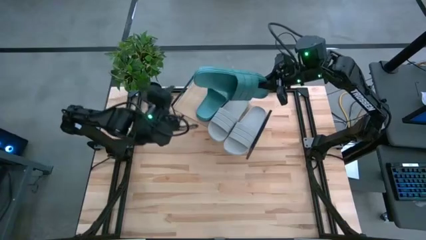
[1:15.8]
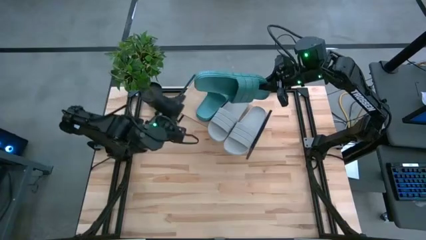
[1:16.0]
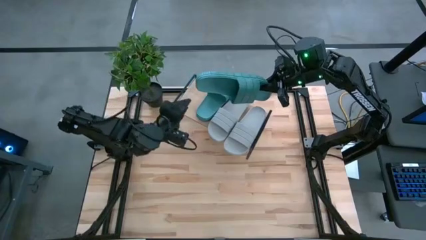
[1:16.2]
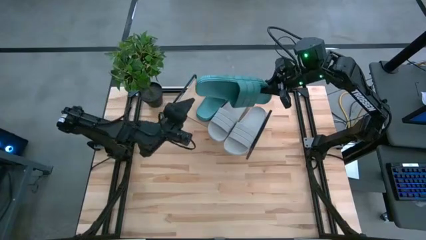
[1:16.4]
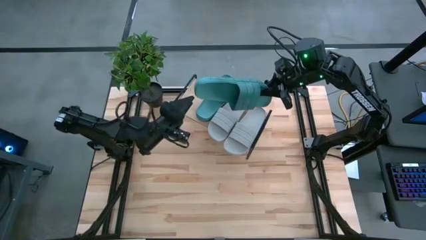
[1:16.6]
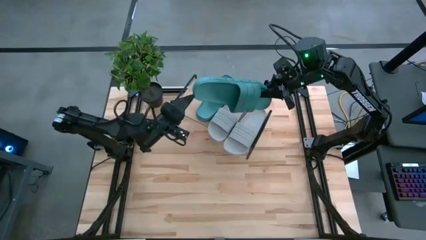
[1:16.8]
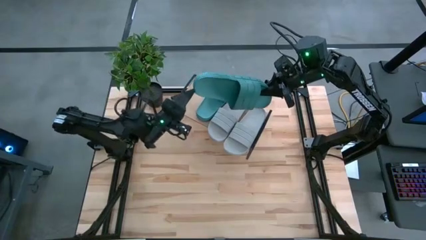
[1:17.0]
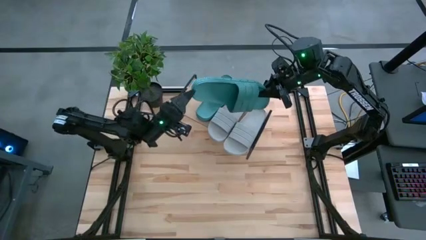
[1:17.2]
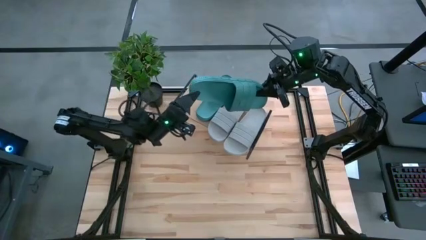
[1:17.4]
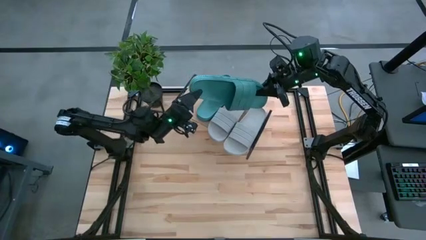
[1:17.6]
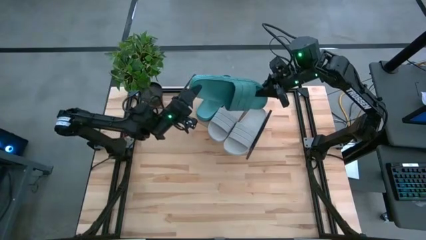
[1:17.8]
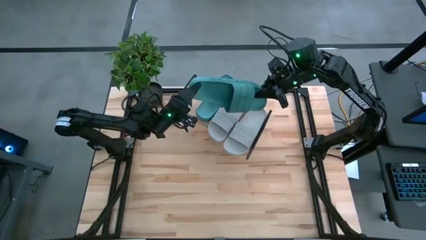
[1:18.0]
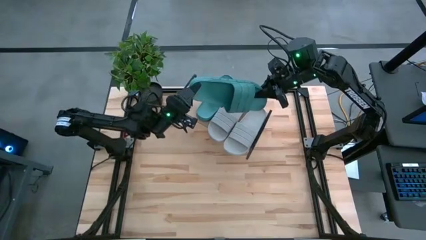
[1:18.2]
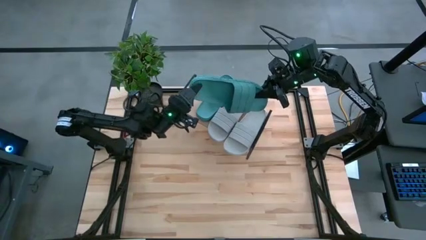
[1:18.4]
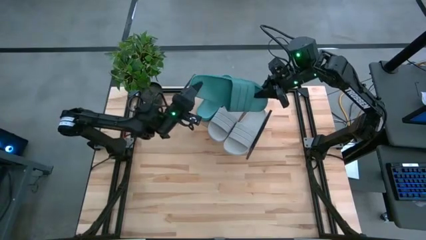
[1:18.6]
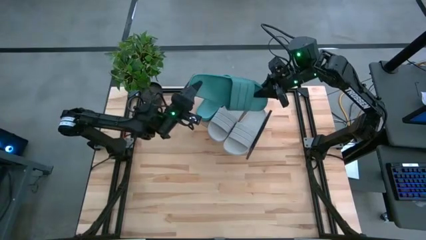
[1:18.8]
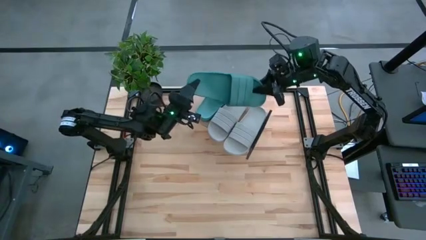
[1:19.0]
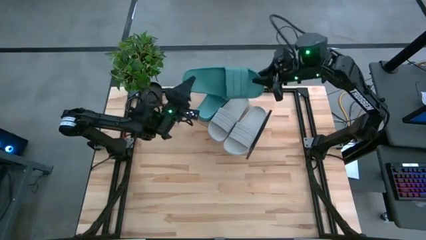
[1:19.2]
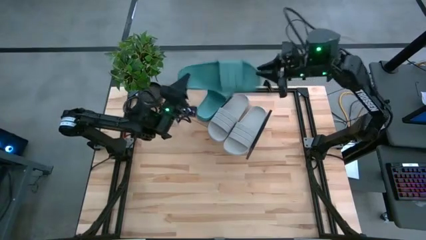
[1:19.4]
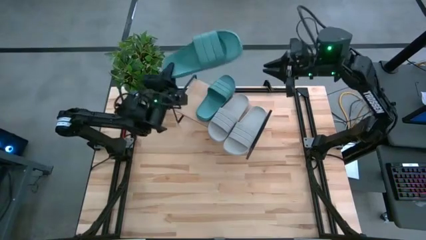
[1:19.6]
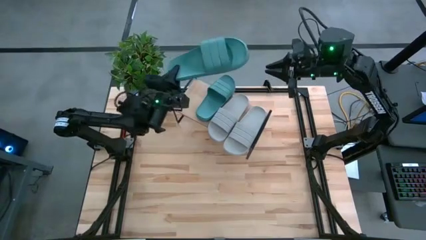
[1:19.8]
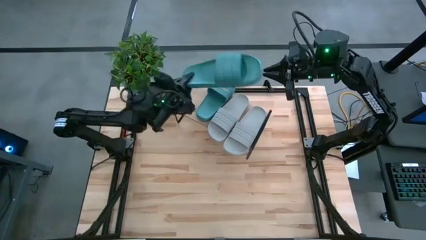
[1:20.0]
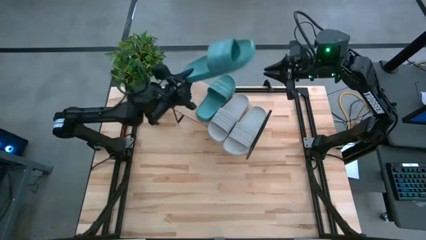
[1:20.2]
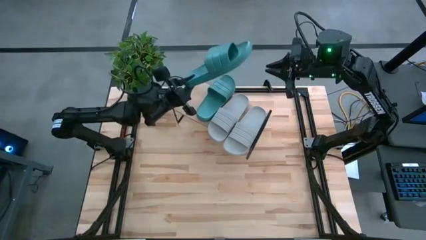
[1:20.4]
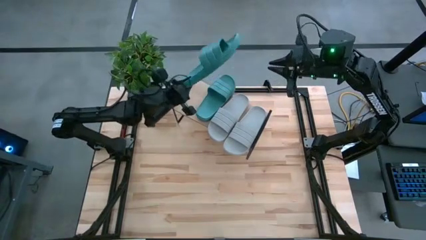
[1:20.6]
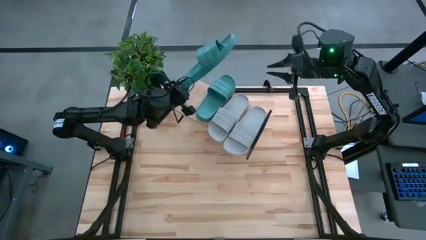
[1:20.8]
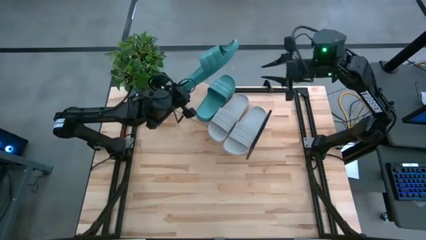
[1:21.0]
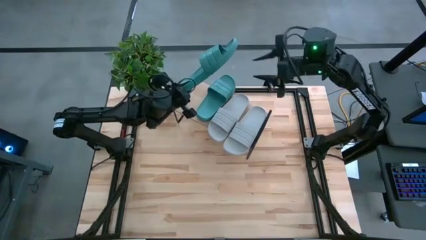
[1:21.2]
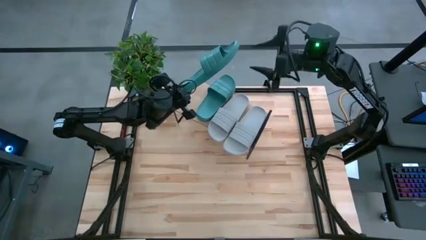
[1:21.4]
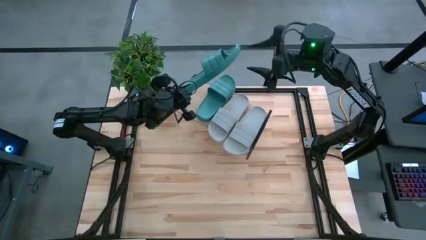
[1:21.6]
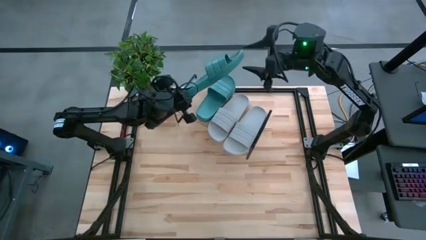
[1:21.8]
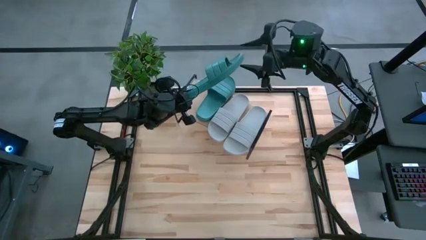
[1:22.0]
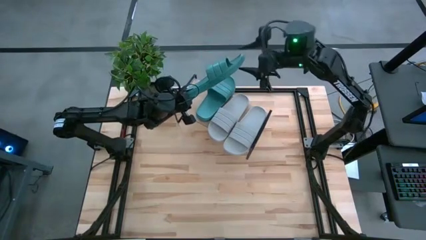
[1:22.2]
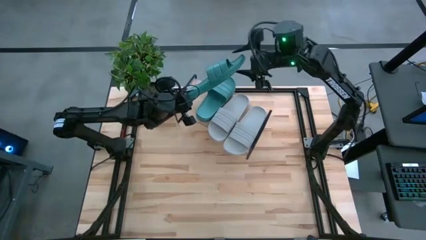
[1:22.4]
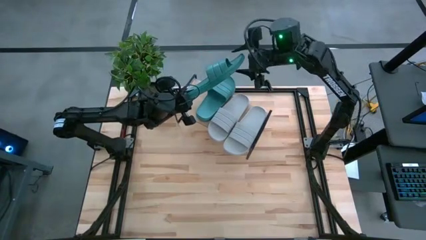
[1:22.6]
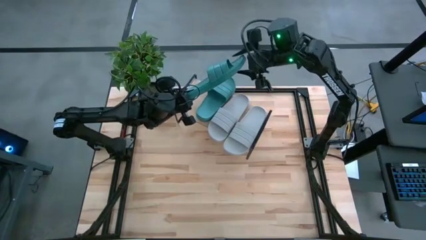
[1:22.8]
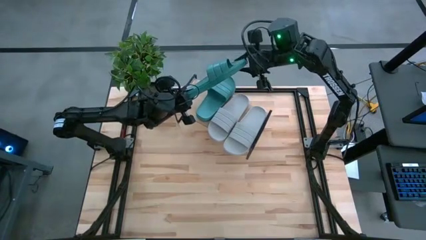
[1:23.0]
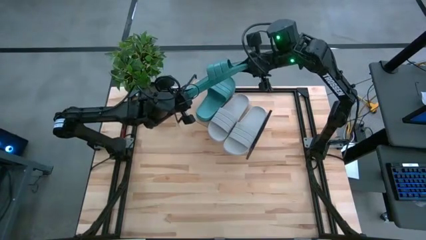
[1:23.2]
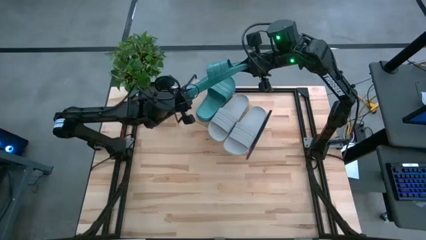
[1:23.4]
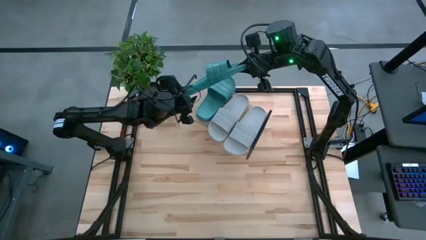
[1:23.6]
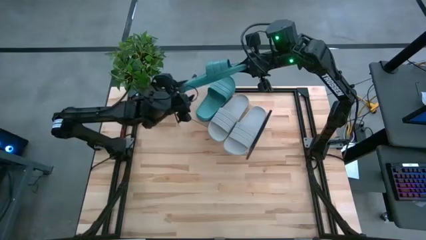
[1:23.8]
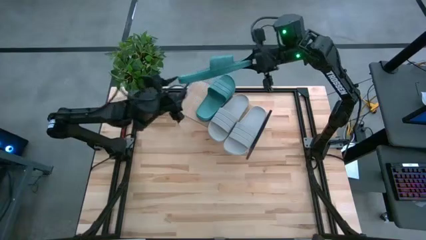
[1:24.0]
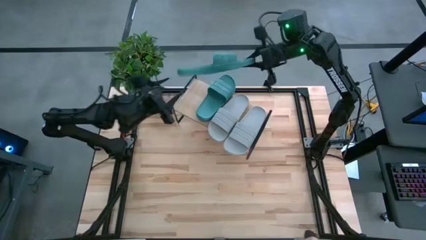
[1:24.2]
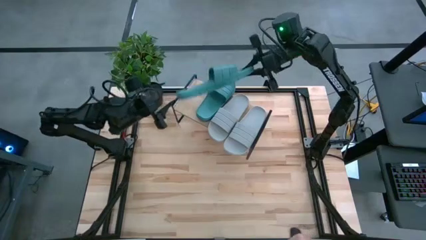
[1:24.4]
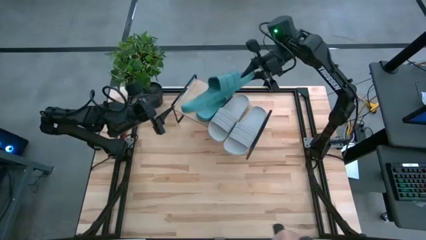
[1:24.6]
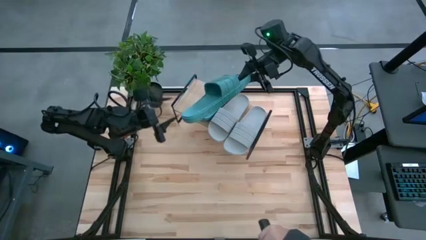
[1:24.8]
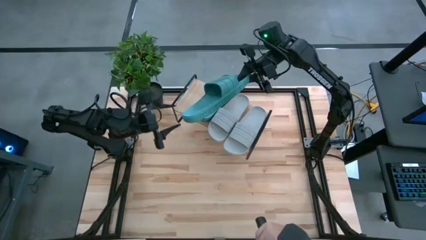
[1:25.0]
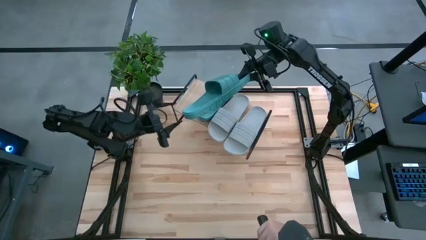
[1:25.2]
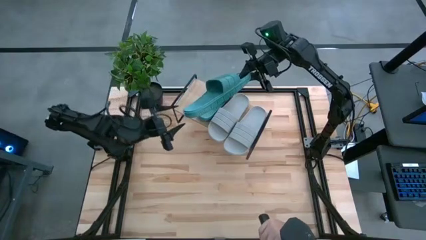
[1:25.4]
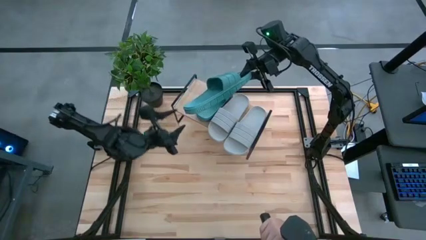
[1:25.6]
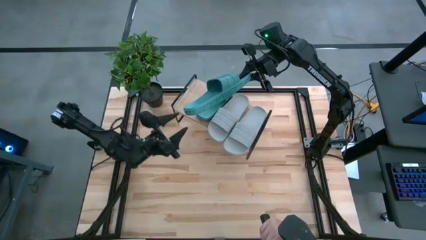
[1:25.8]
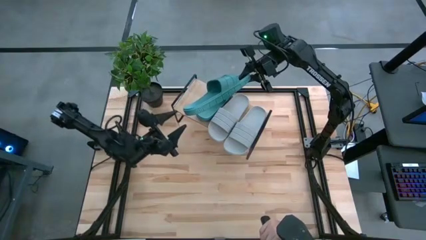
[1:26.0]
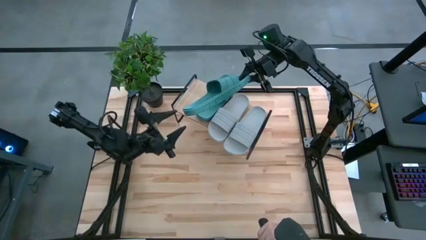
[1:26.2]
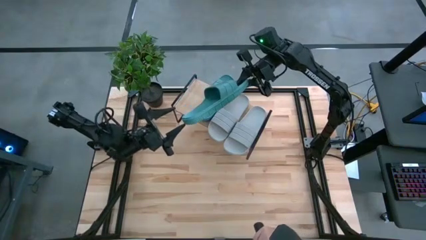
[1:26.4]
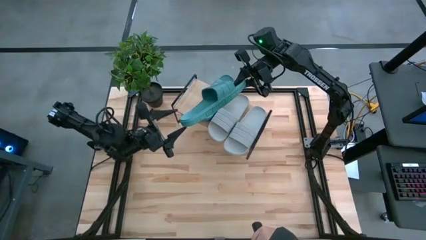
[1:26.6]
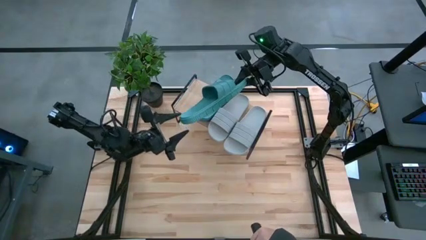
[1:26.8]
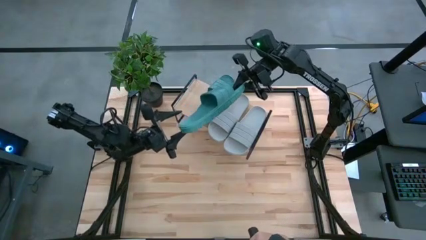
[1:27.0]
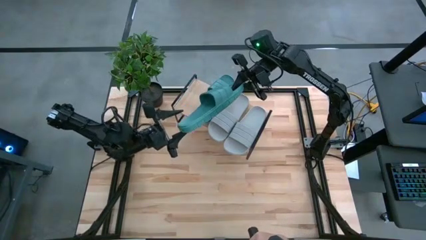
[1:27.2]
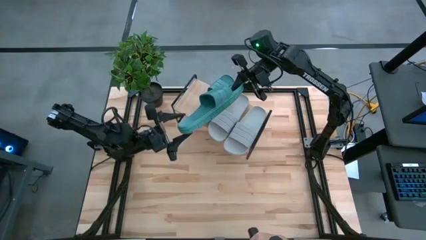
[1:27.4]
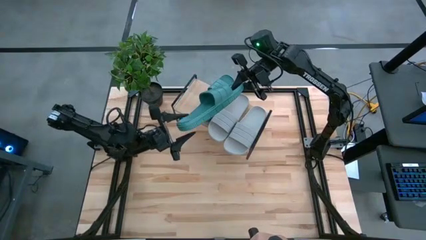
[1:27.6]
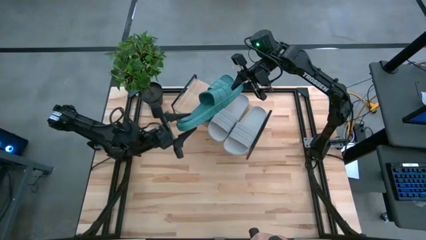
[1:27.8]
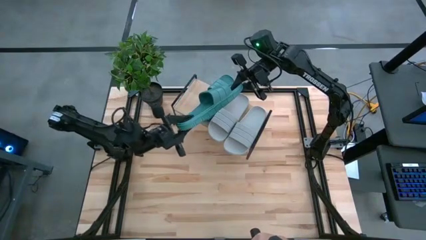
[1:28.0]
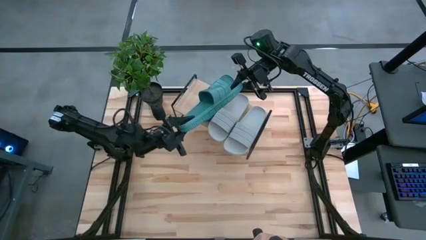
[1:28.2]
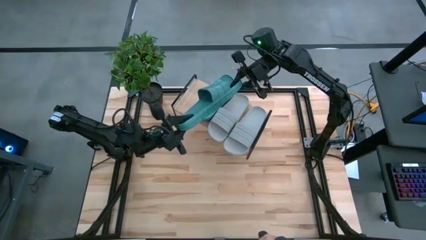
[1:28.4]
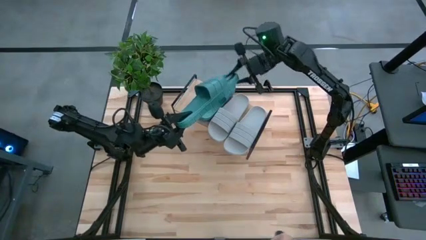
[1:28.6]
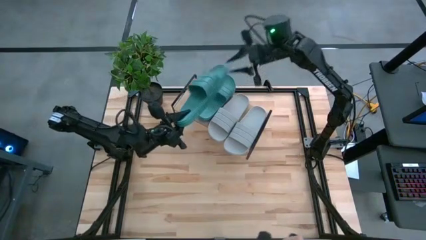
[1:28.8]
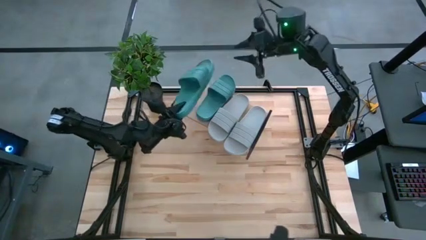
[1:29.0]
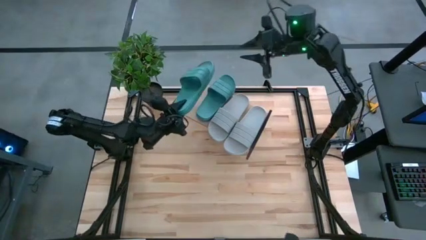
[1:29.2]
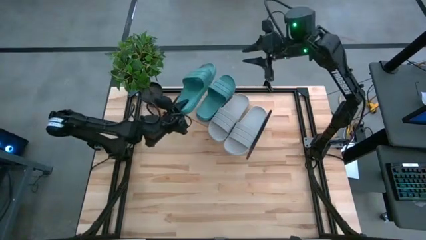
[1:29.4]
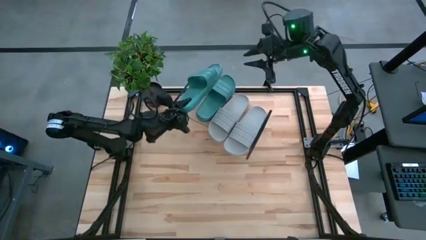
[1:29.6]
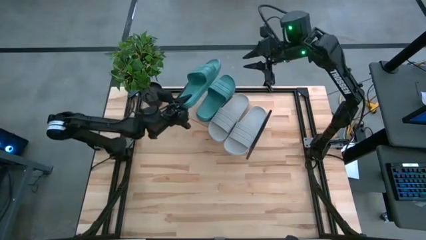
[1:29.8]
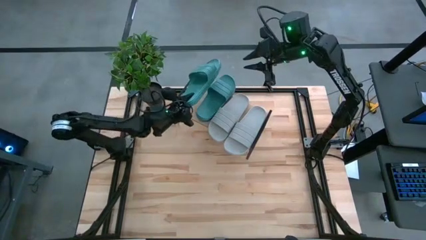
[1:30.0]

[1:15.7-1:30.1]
Task: Pick and place slides into the shelf
Put the green slide on the shelf
